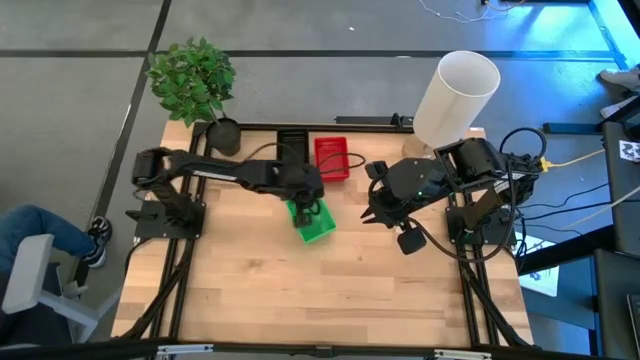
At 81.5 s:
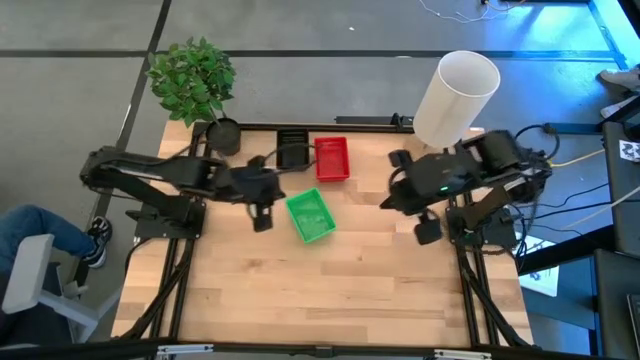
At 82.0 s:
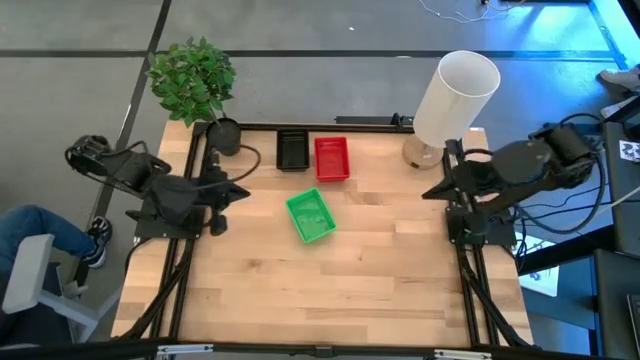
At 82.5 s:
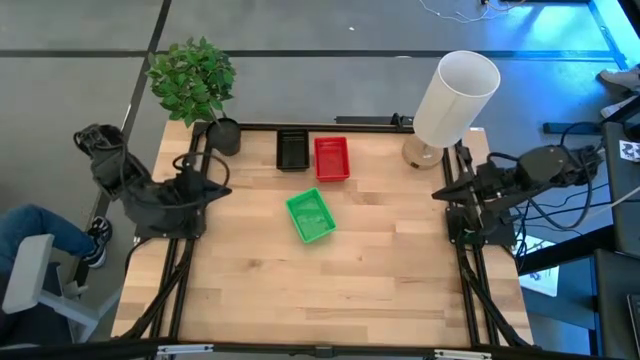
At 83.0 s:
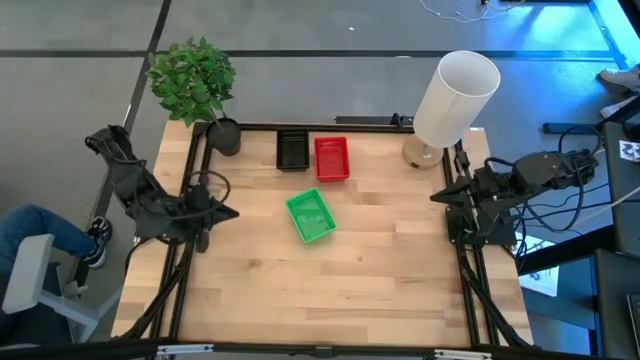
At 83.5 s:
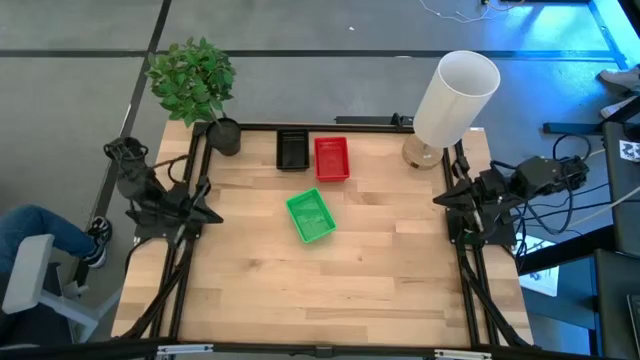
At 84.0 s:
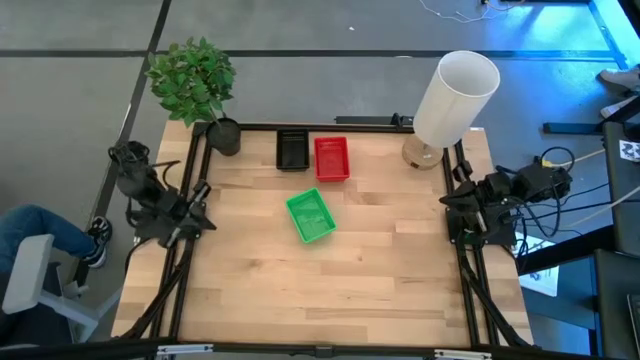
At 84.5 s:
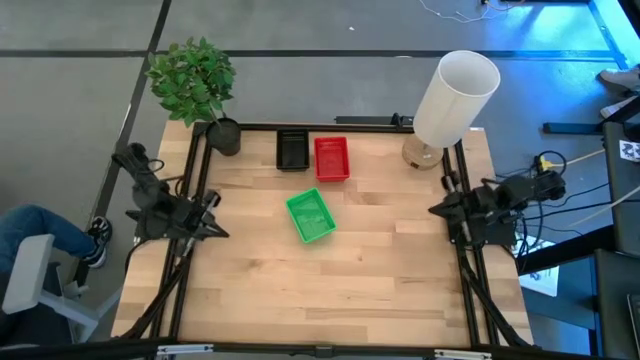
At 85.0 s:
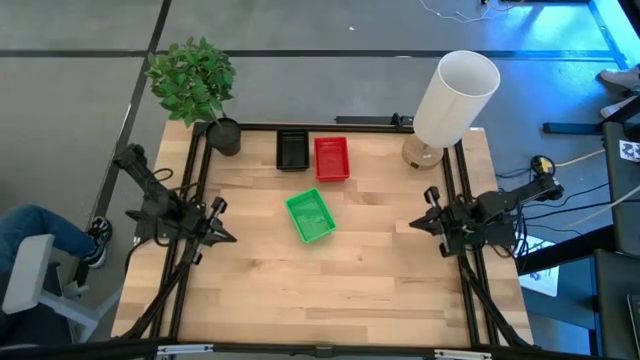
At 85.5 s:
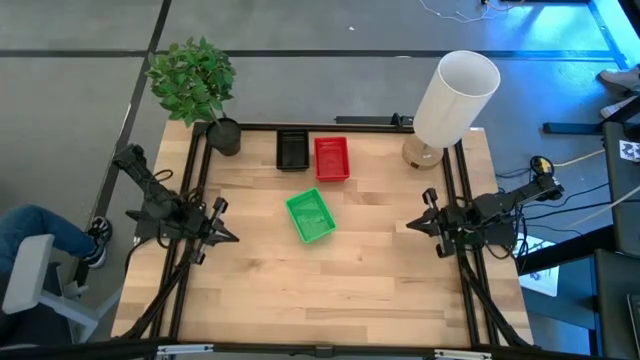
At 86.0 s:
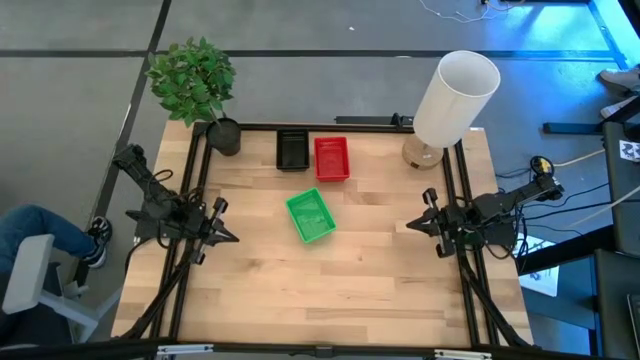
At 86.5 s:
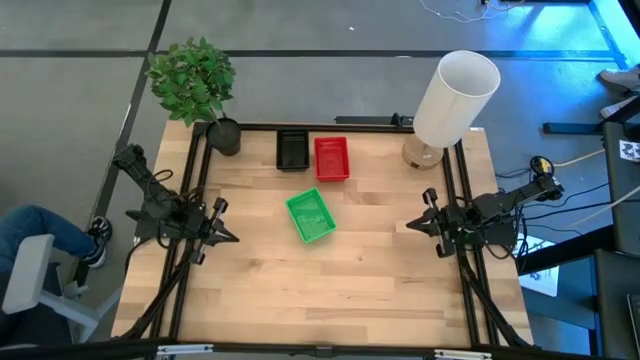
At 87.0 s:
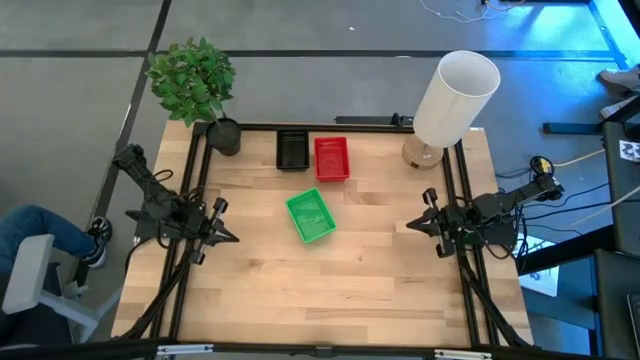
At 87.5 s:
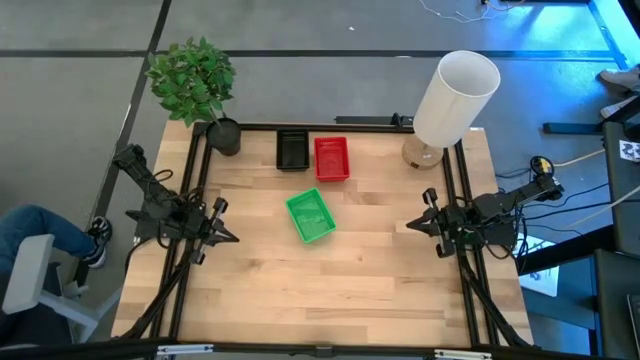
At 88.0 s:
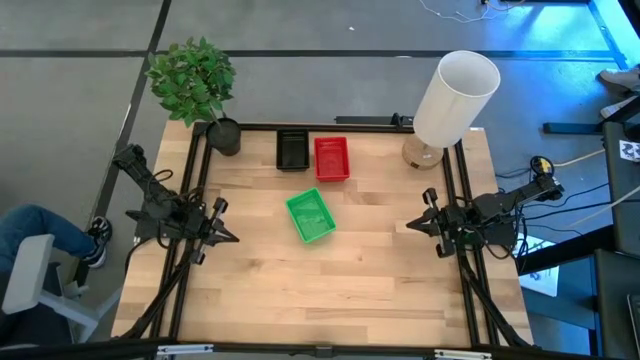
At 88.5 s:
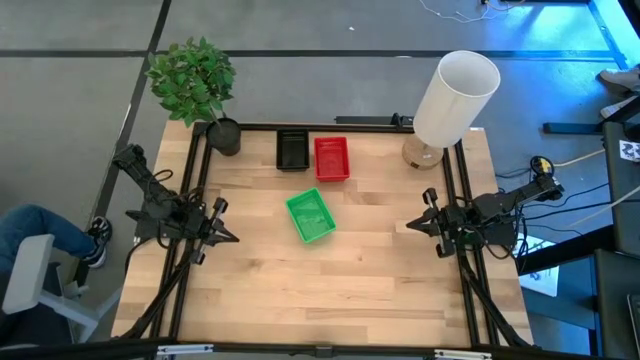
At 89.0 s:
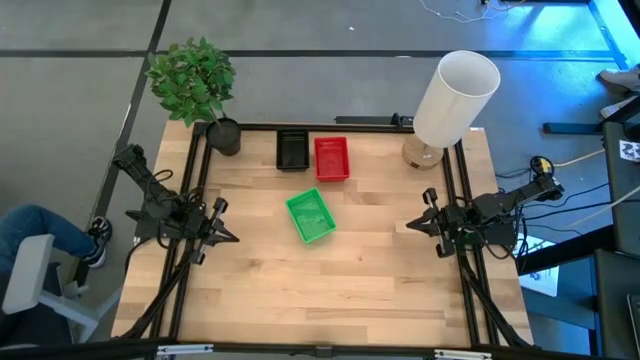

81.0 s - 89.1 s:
Return to Home Position

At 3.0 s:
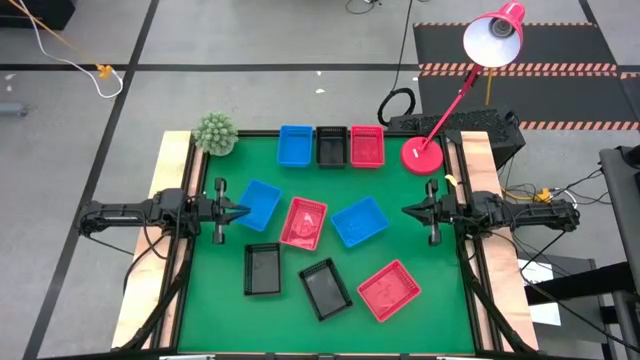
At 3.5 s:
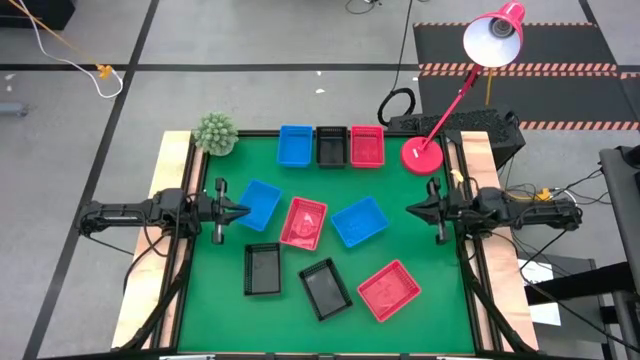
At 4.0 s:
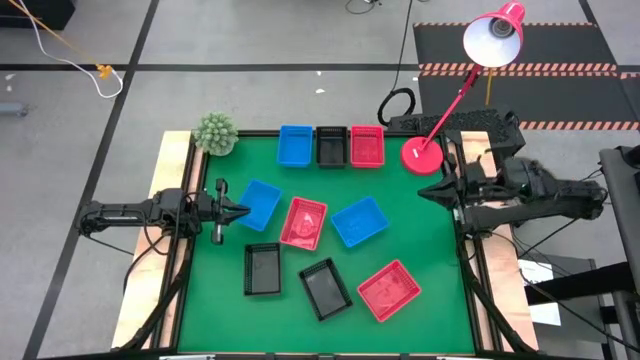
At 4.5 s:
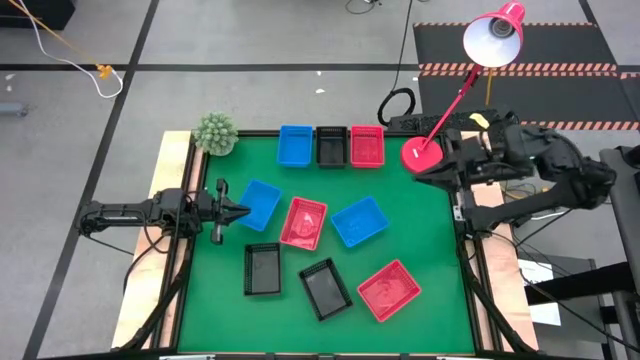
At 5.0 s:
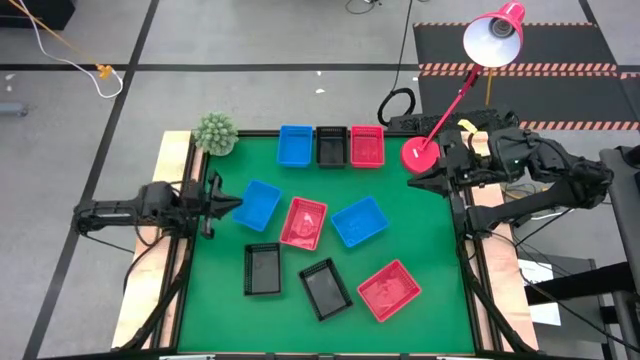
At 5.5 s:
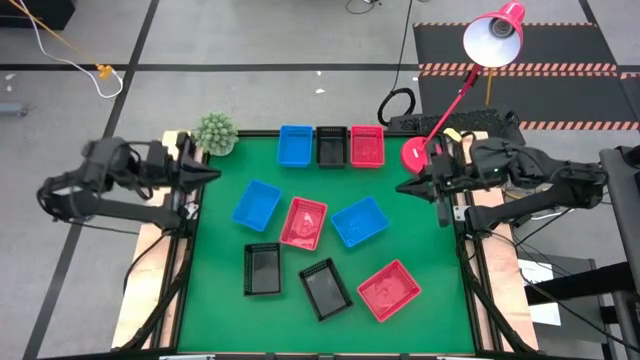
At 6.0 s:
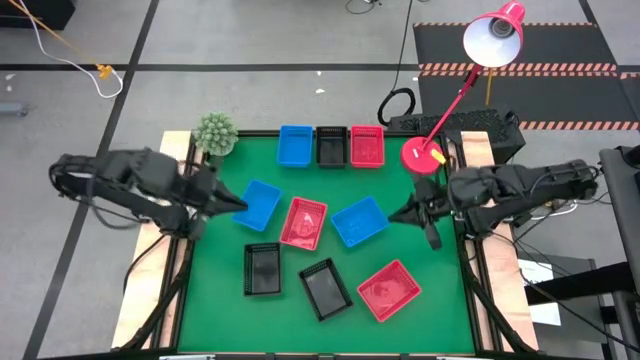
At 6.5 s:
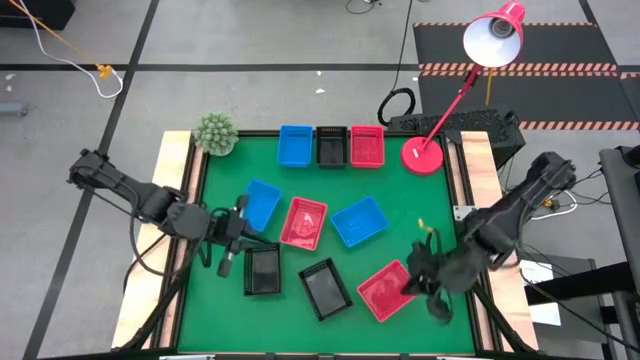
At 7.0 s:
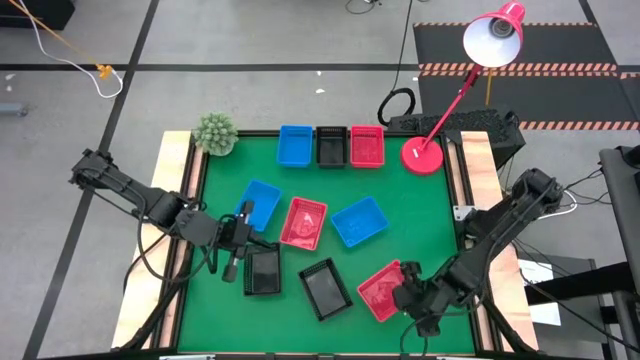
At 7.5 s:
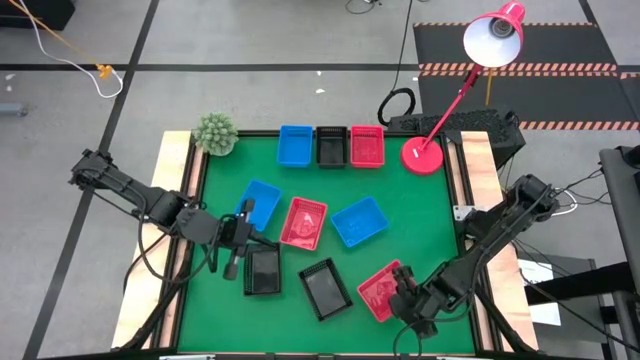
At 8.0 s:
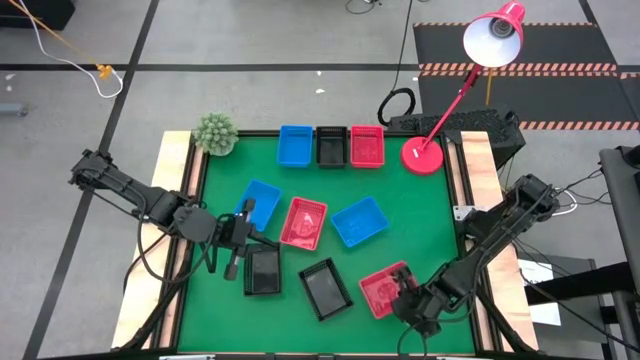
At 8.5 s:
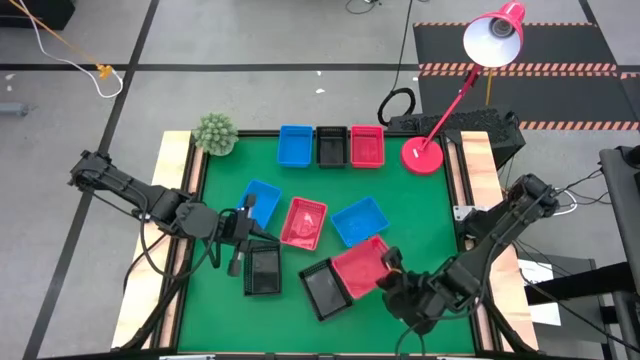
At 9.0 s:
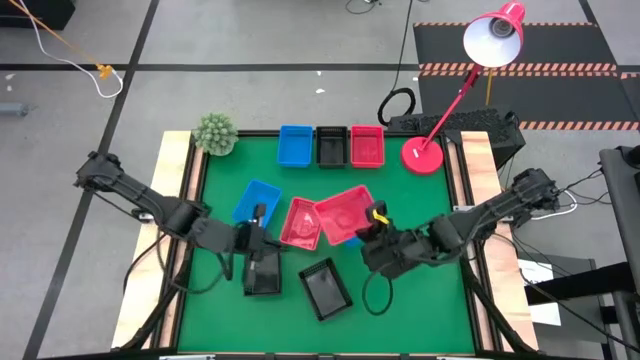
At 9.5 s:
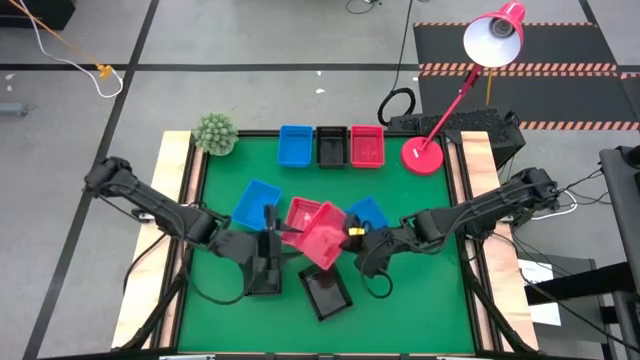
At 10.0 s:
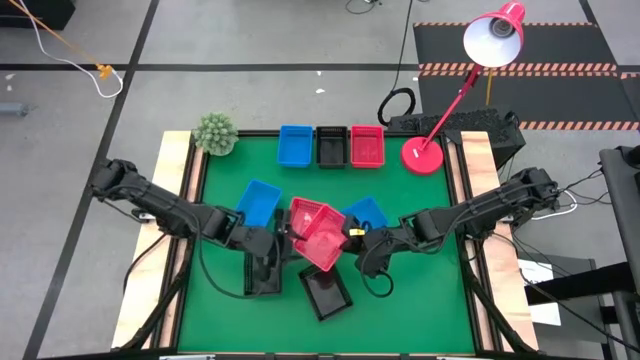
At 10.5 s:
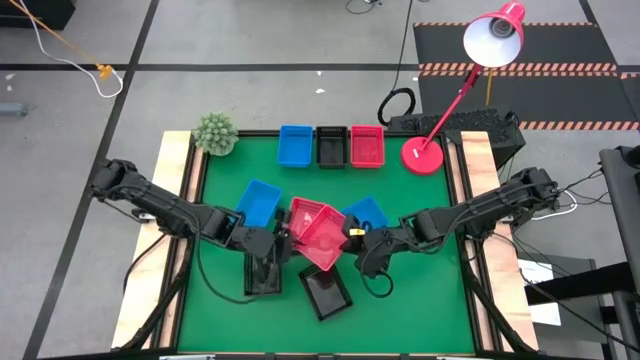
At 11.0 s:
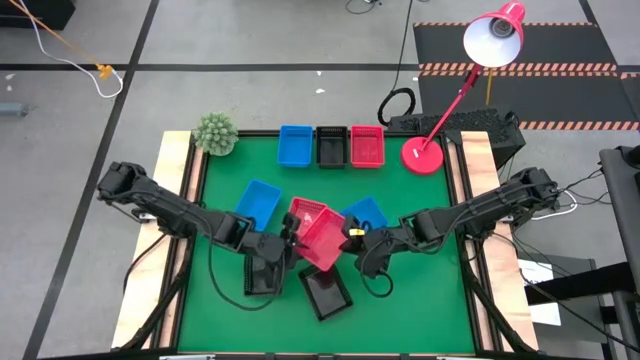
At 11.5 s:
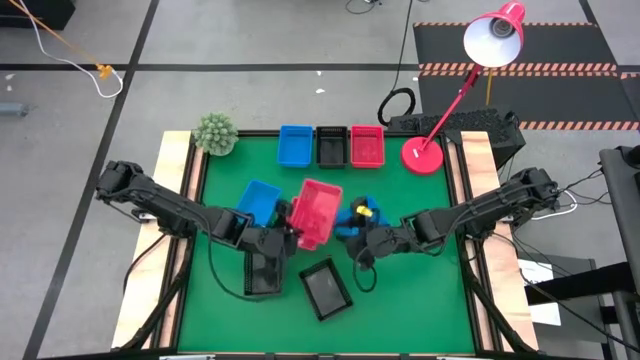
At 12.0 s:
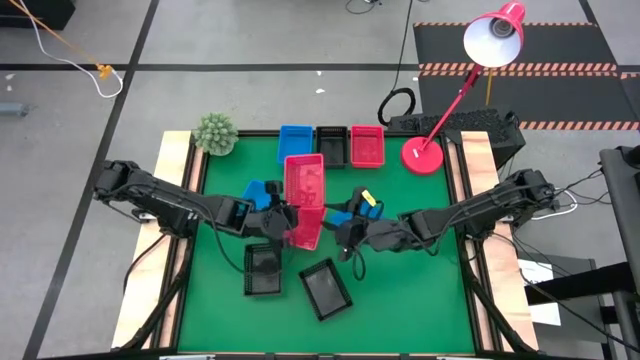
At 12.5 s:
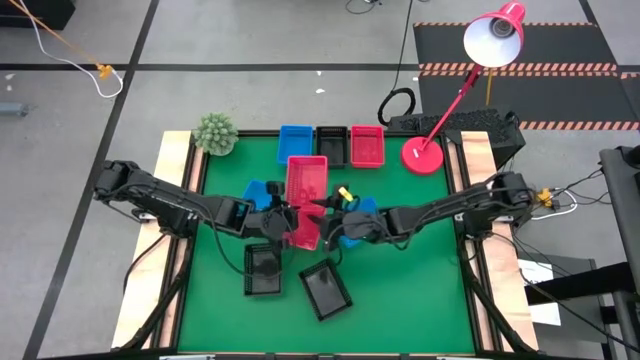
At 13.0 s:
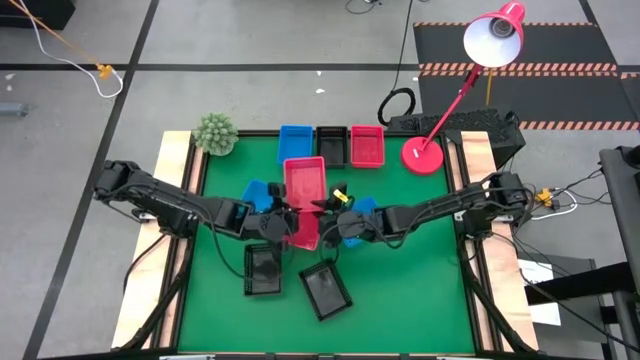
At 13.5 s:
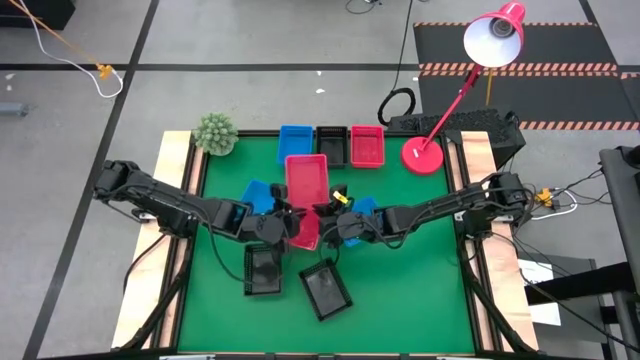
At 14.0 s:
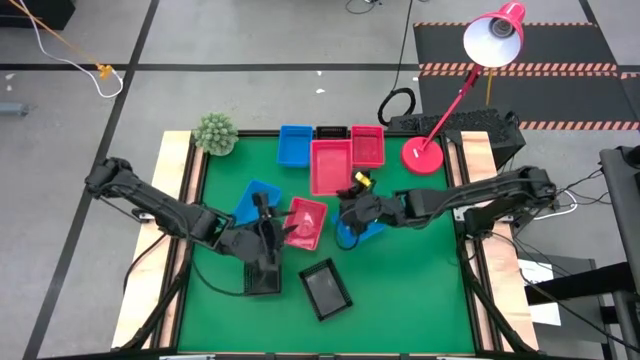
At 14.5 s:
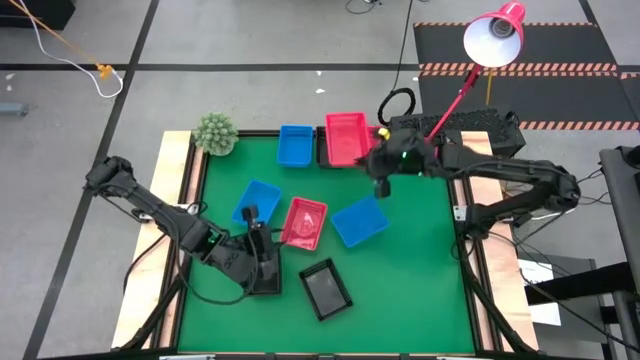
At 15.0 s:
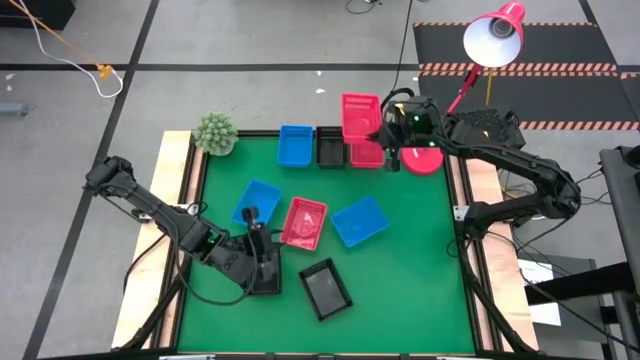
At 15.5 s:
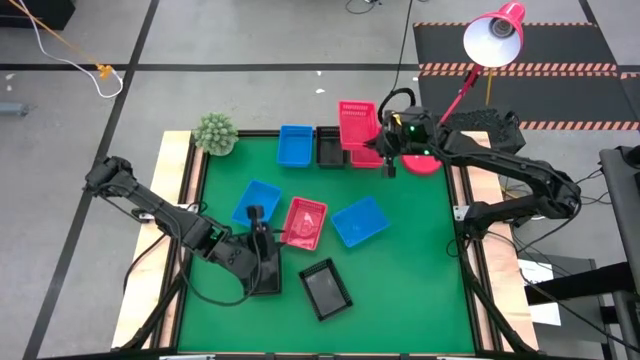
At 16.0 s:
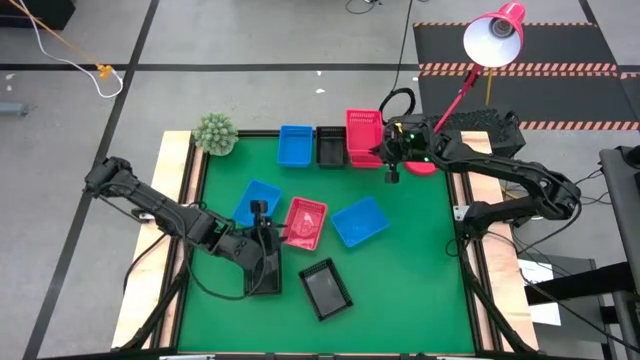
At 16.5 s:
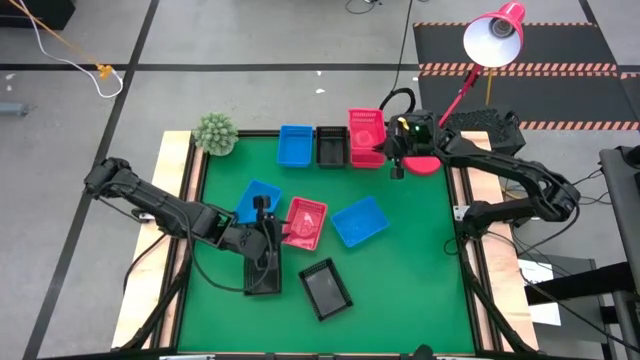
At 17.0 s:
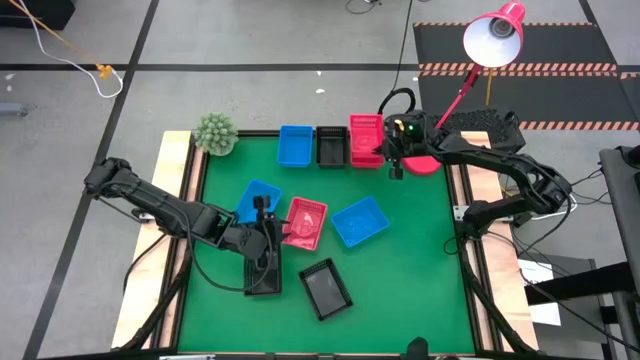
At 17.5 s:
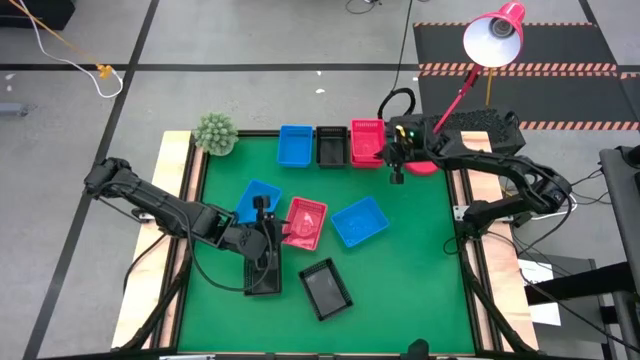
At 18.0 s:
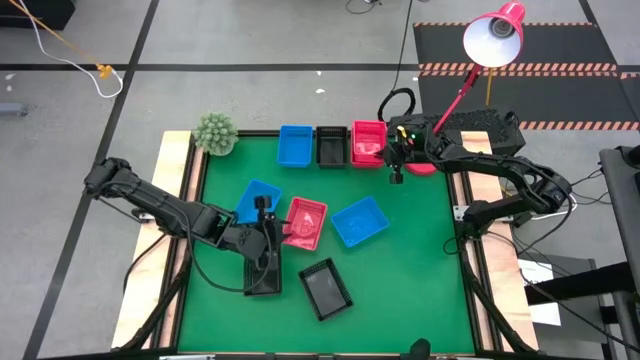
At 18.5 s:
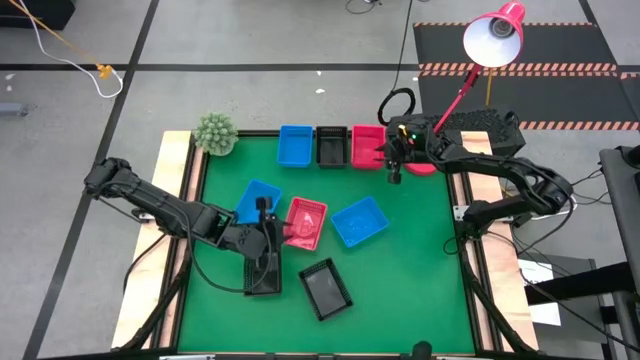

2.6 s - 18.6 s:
Stack the bottom red basket on the top red basket
